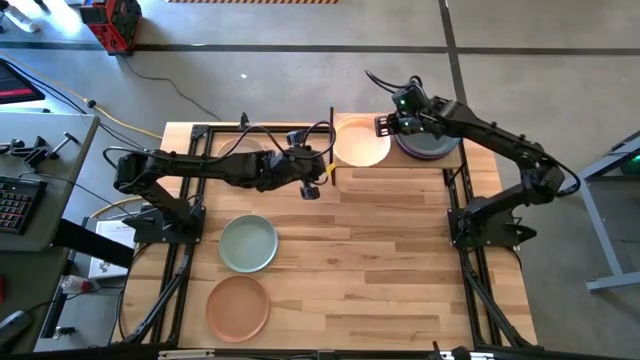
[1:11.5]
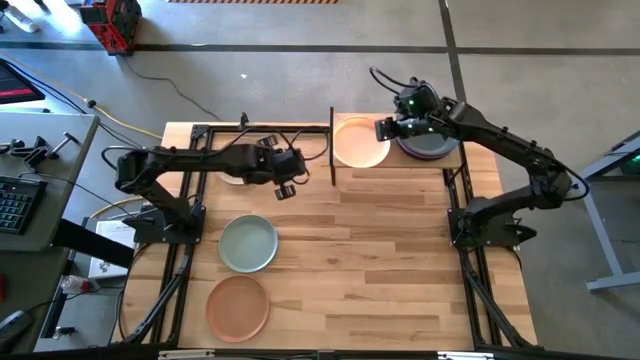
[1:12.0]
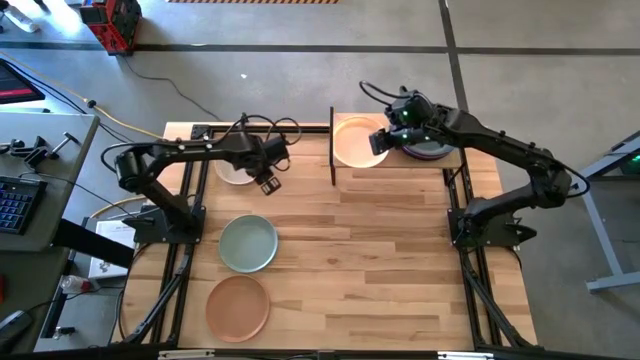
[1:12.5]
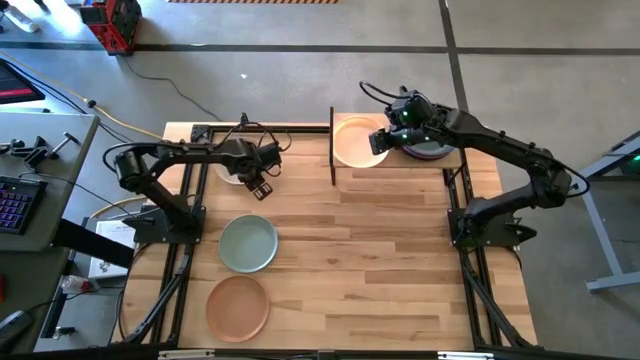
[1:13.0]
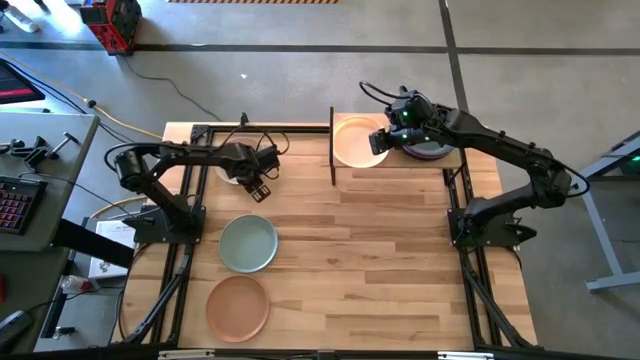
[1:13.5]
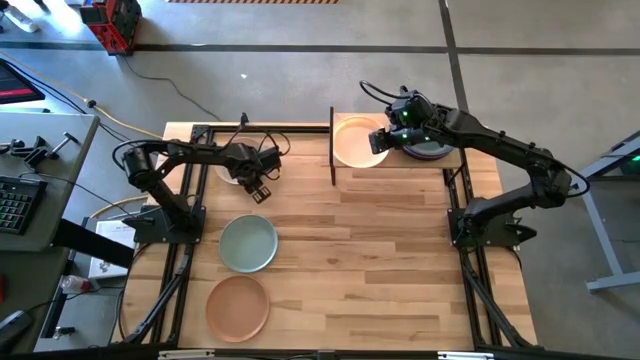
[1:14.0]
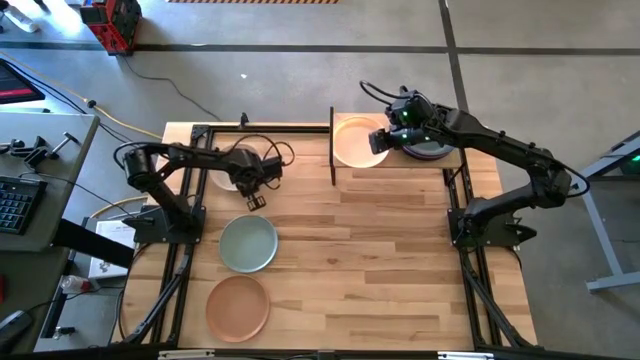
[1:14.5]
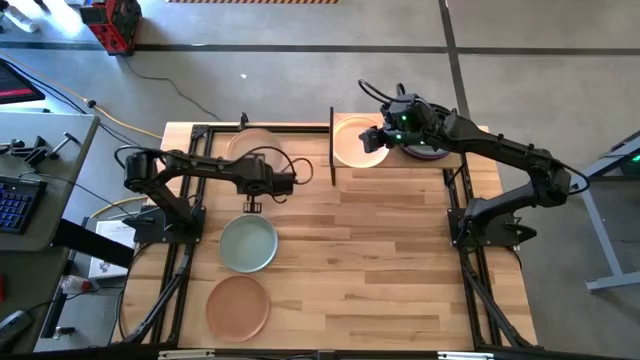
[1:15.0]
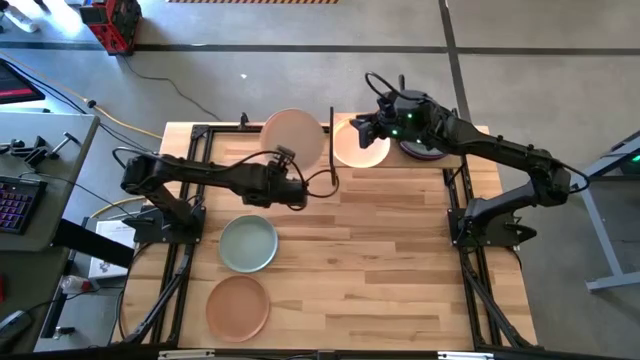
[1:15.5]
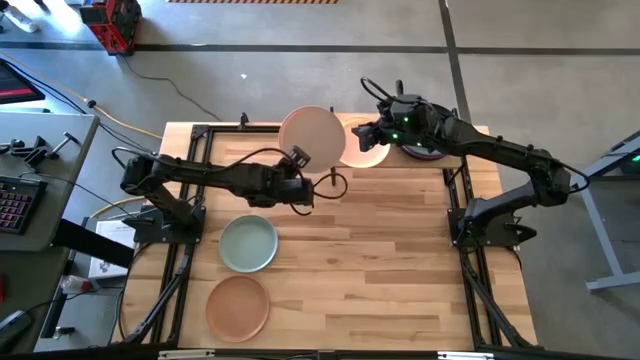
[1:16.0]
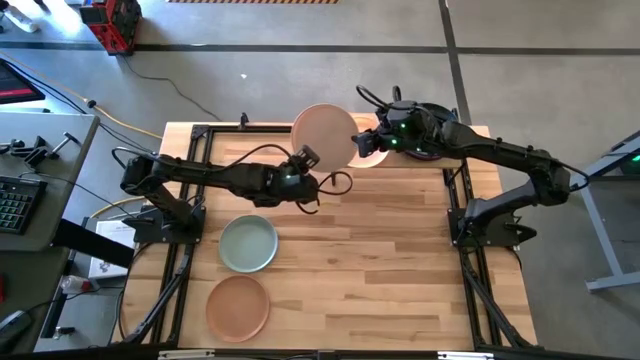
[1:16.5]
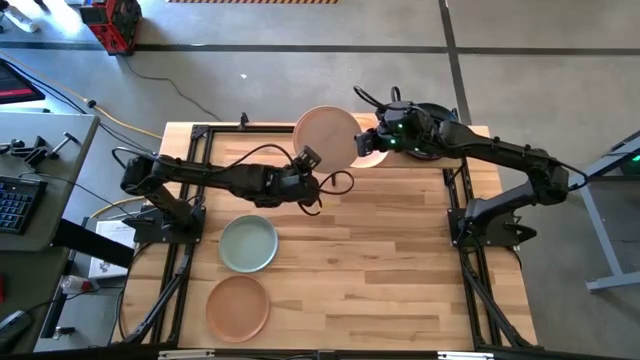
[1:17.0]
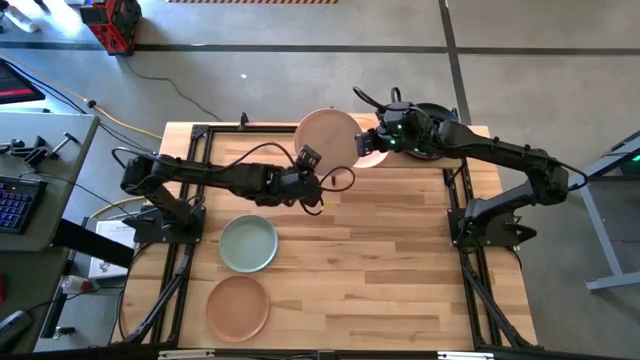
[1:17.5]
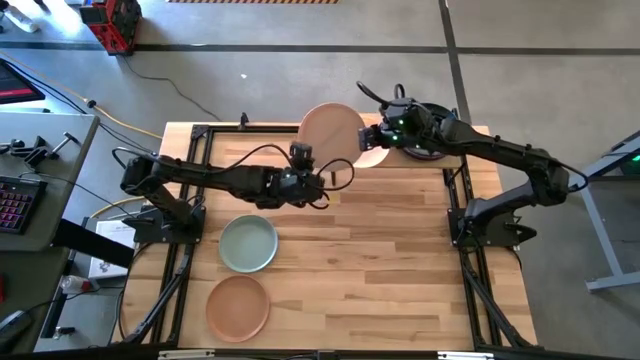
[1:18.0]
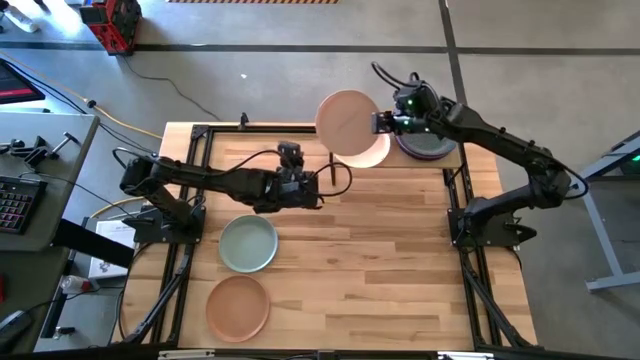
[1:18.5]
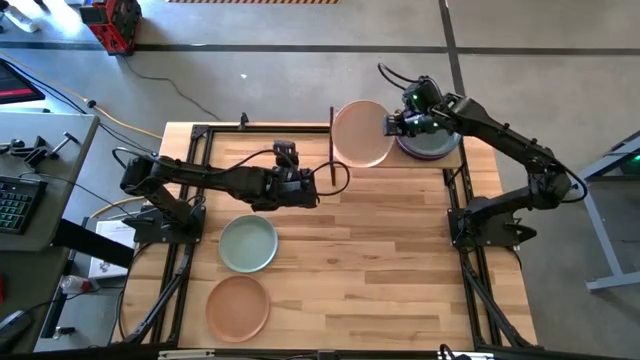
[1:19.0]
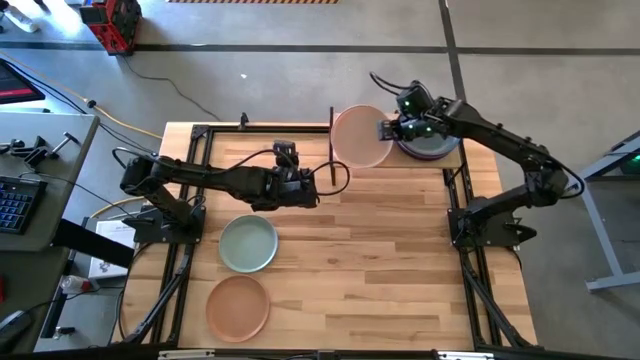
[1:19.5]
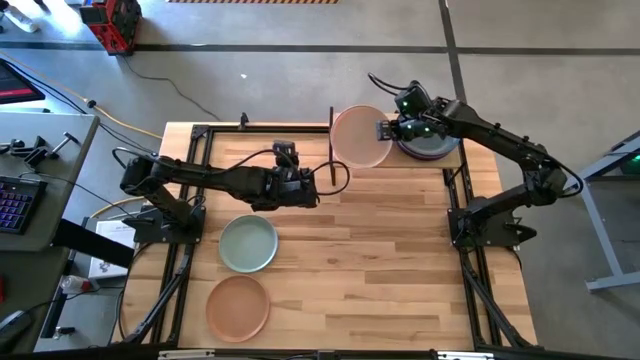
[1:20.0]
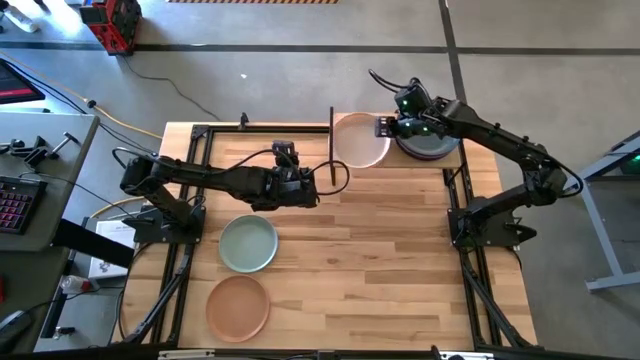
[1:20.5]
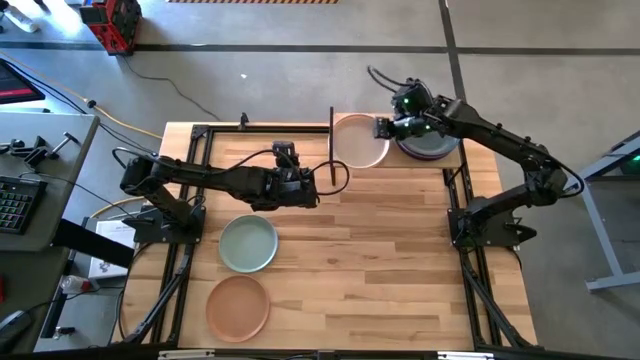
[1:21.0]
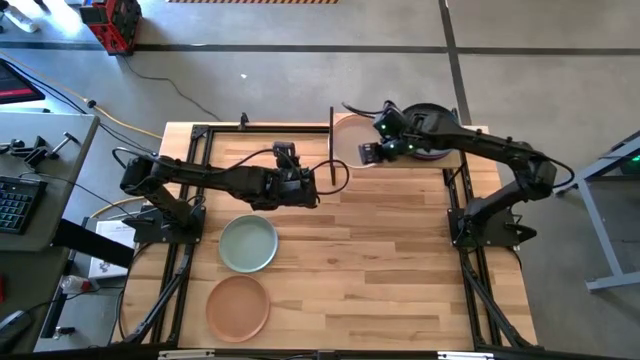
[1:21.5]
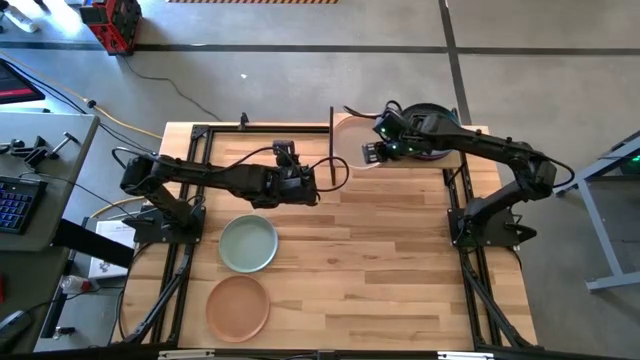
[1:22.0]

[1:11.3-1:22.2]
Task: Place and stack plates onto a shelf
Stack the white plate on top of the light brown plate on the shelf

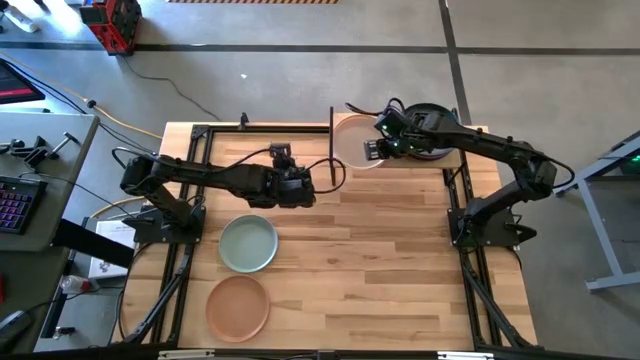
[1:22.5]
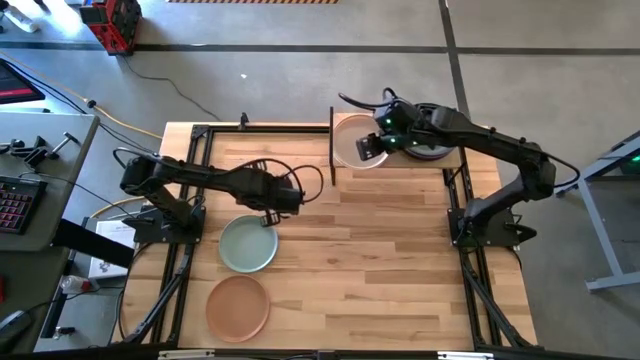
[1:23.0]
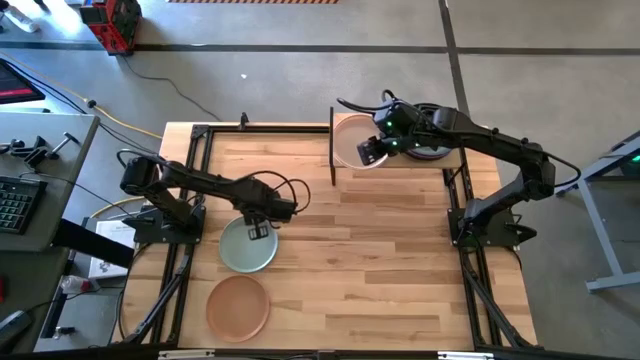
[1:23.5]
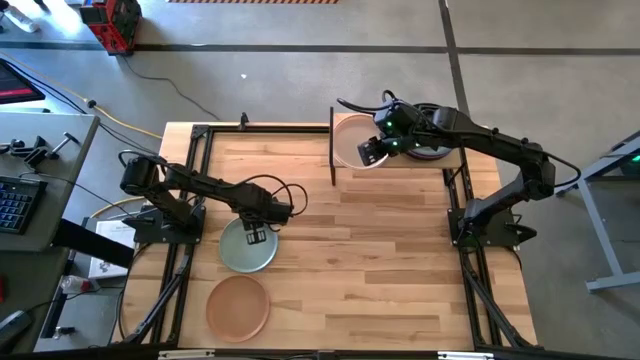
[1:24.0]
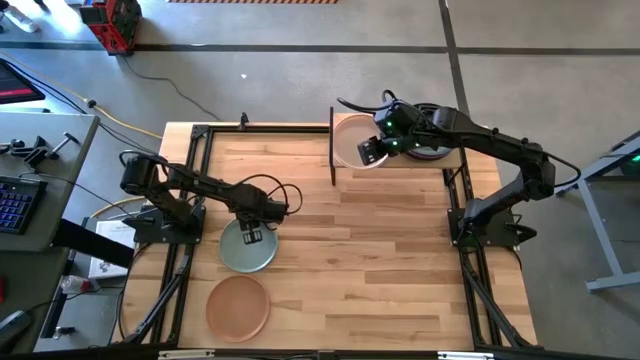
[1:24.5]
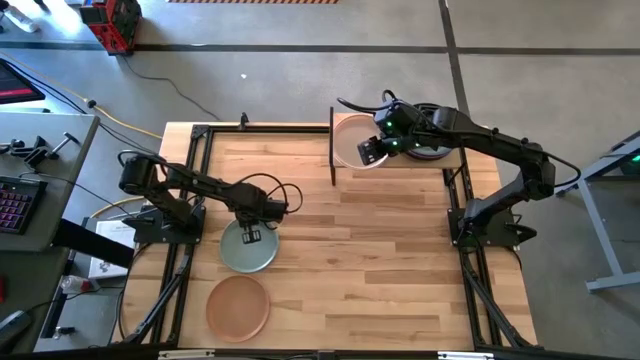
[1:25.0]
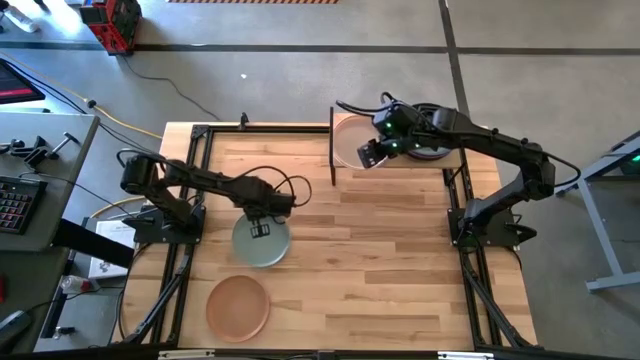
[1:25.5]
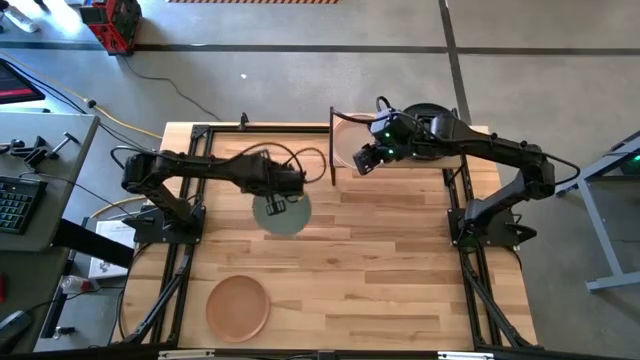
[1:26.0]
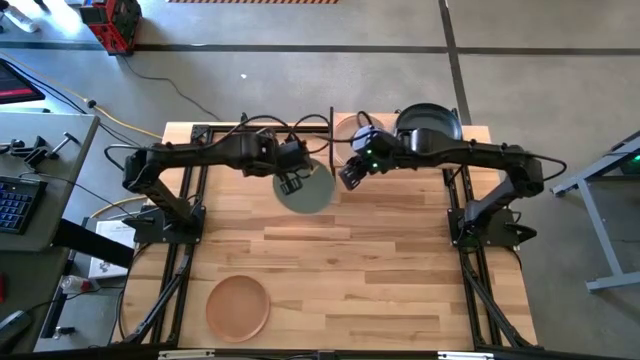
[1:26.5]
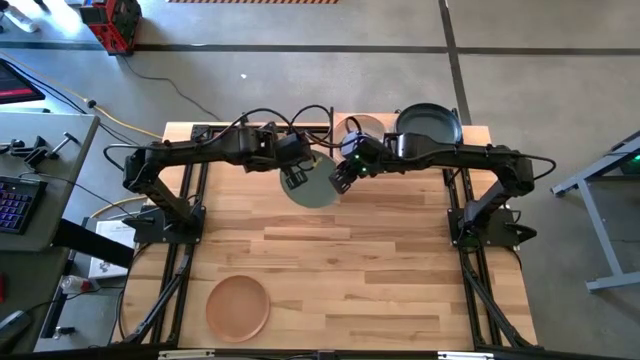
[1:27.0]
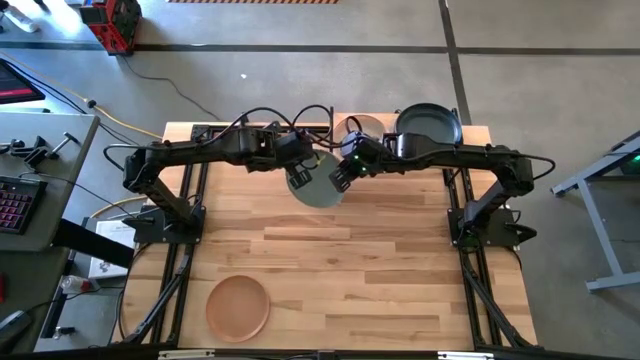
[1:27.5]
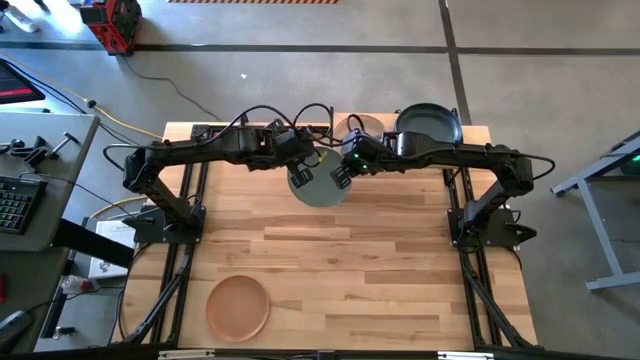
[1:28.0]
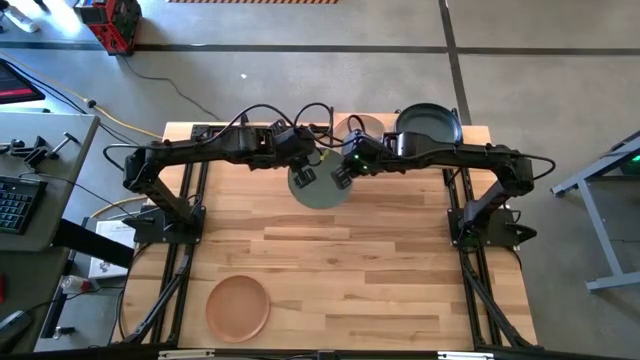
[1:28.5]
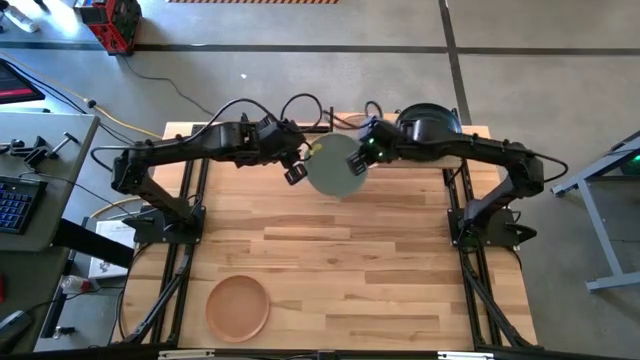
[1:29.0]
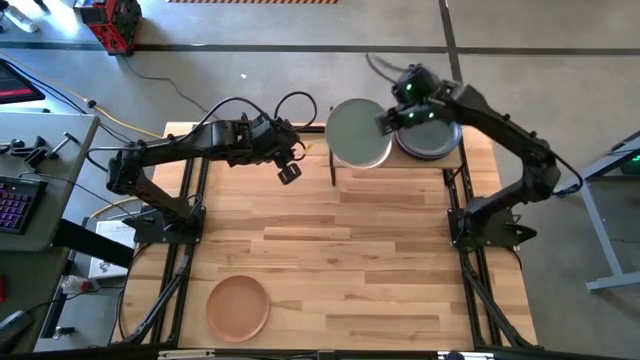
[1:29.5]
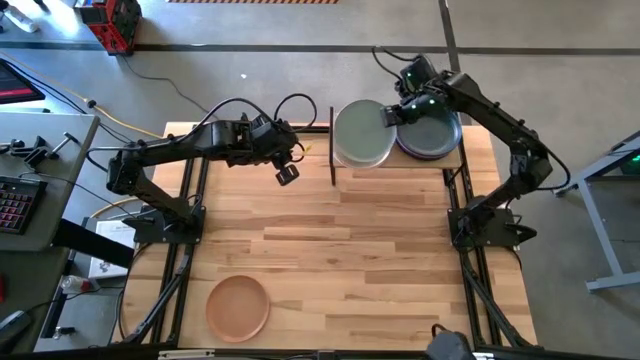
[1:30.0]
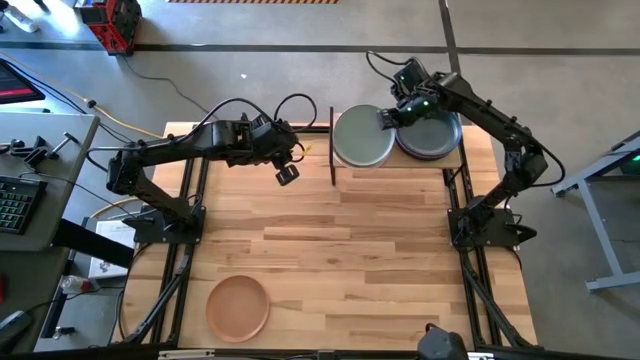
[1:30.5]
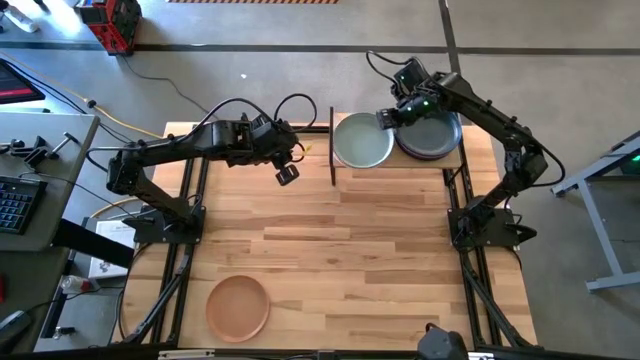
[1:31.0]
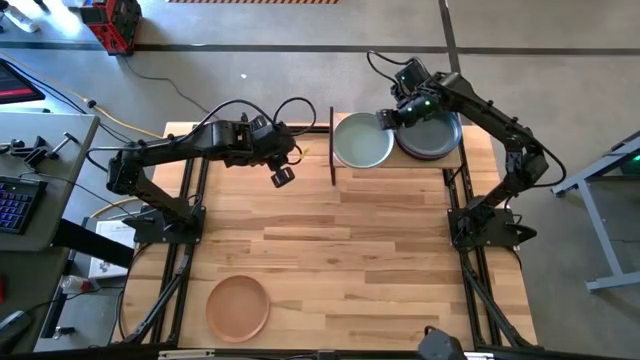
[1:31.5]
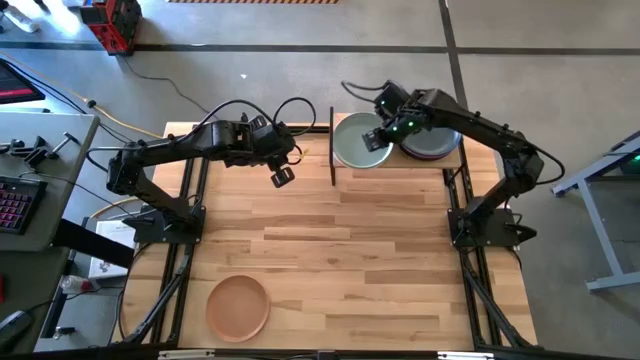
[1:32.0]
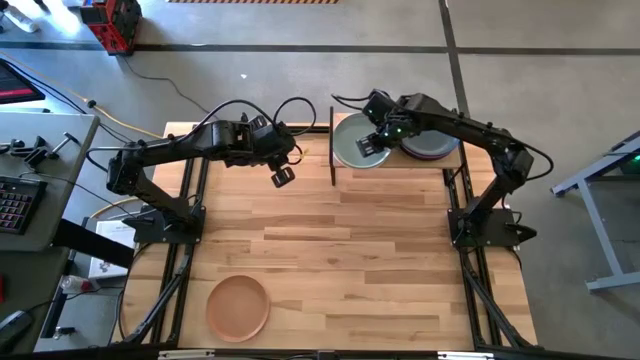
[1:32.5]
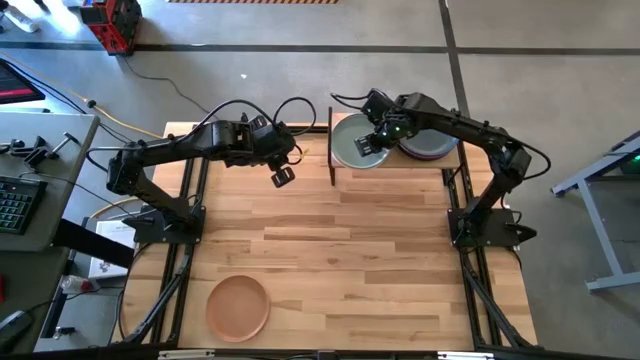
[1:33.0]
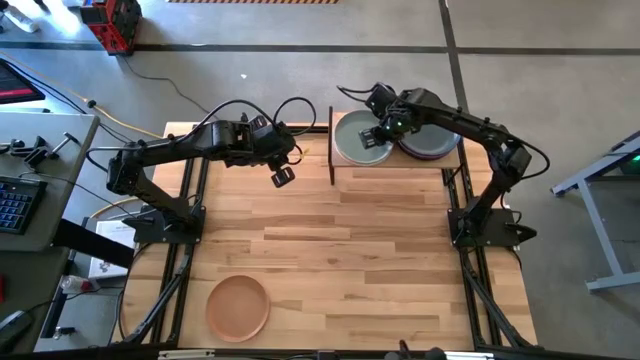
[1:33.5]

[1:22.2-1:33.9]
Stack the blue plate on top of the white plate on the shelf
